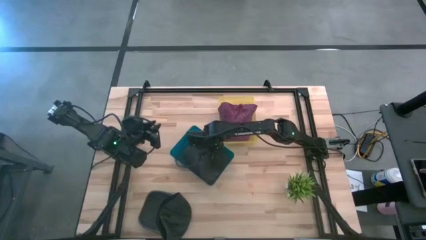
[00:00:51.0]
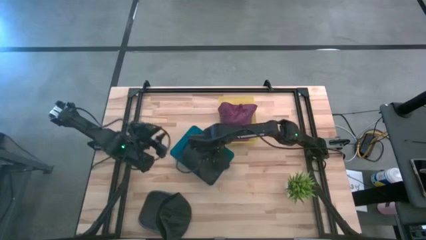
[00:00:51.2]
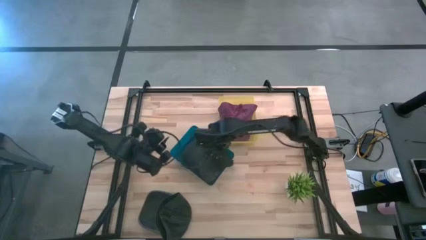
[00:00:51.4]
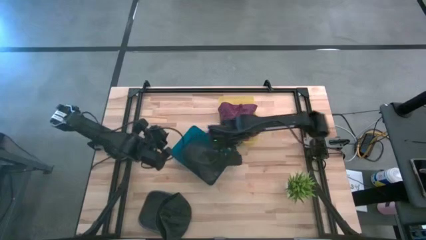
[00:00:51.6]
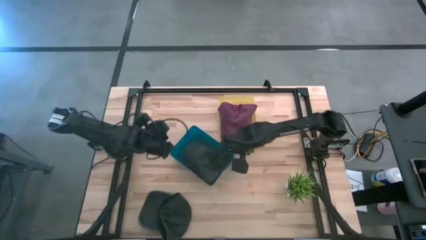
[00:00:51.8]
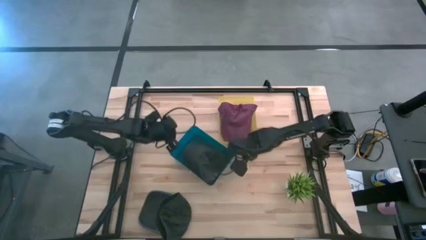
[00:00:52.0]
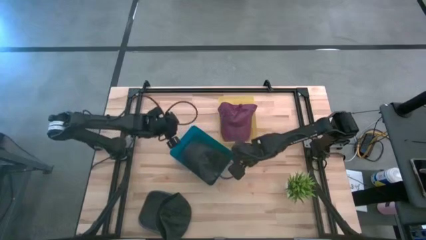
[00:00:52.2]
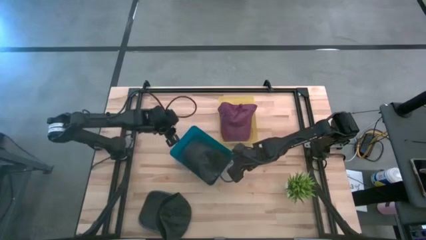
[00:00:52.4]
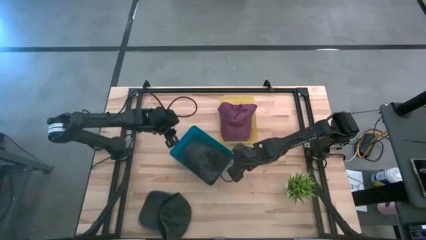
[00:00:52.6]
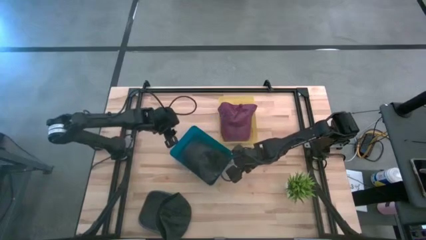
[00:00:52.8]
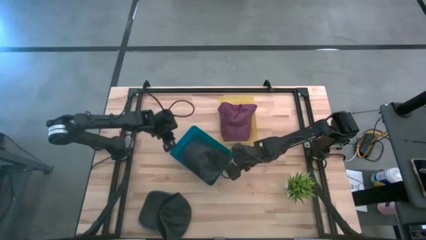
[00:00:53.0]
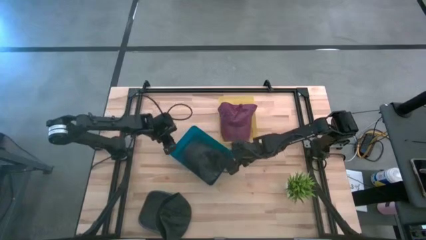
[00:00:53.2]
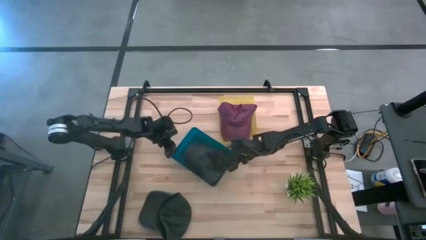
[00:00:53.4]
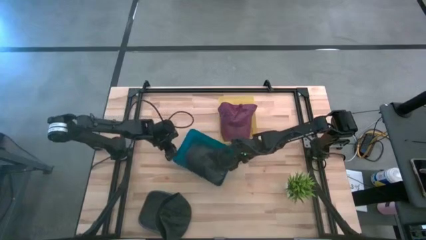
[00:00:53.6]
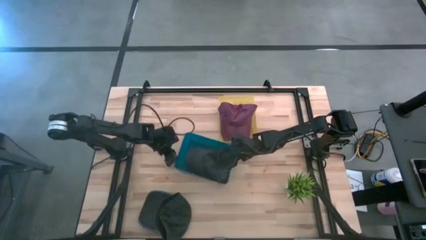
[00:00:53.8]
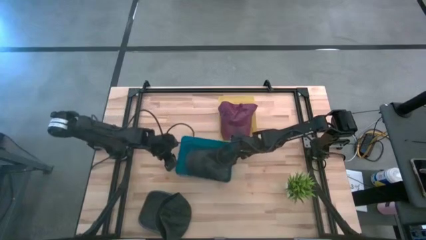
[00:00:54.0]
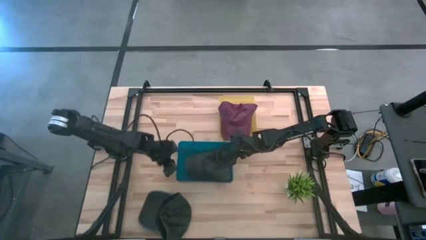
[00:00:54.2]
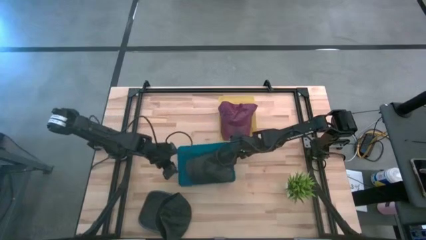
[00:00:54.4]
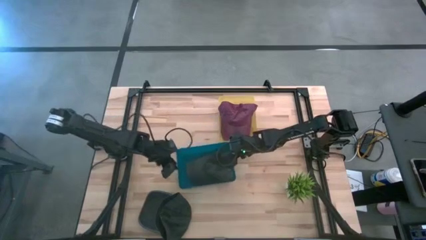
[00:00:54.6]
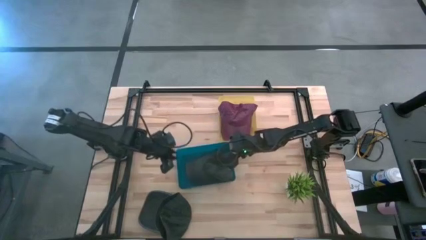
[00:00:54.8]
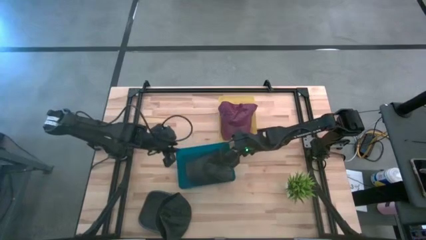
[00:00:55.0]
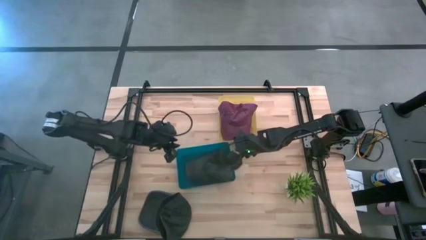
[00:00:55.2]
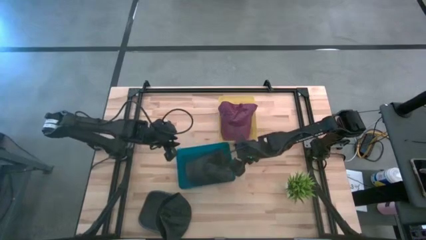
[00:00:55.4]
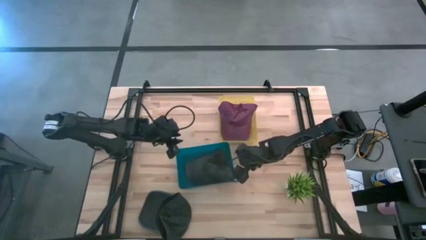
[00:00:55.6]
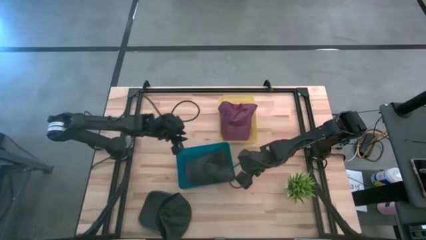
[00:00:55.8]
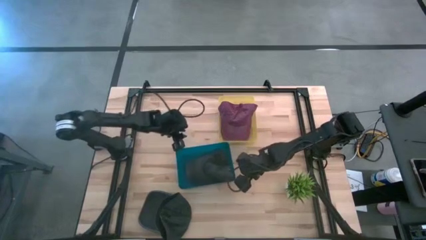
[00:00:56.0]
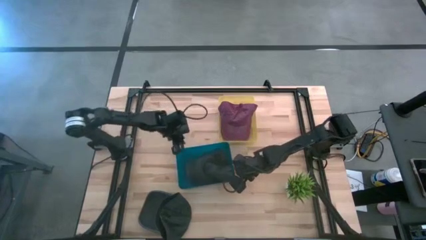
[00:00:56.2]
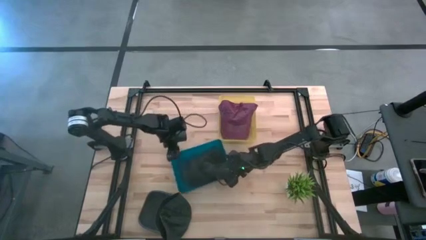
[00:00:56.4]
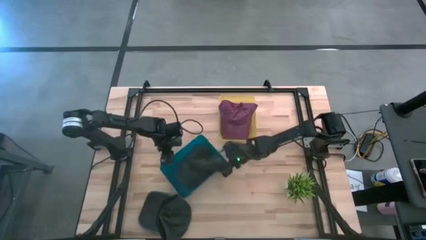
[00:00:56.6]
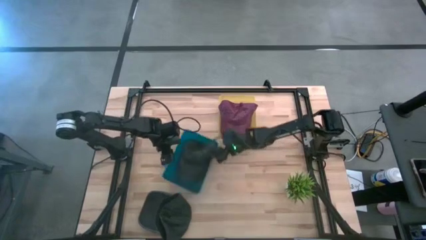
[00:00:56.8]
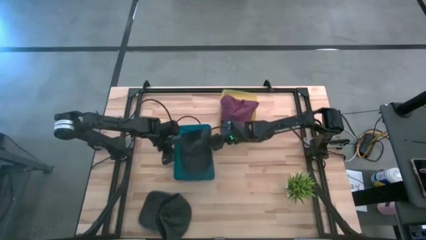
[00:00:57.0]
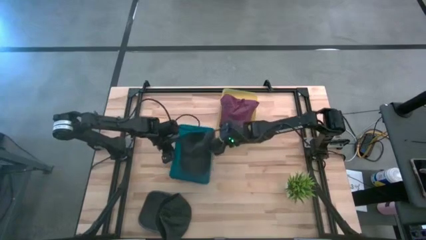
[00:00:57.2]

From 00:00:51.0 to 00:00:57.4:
Task: Pick & Place hat
Adjust the blue bin

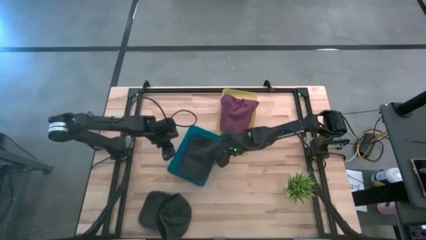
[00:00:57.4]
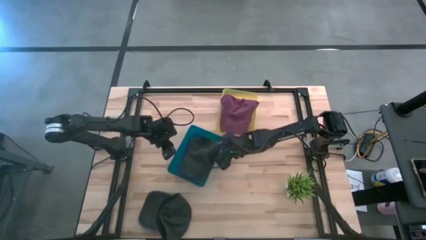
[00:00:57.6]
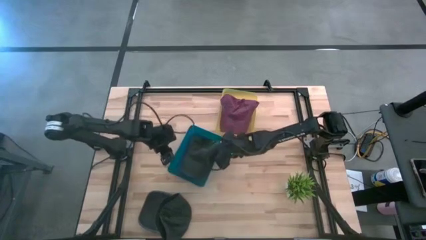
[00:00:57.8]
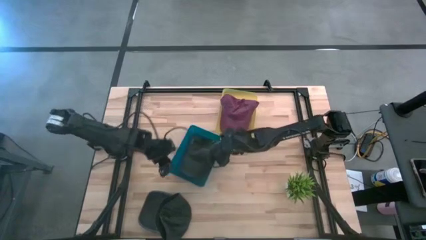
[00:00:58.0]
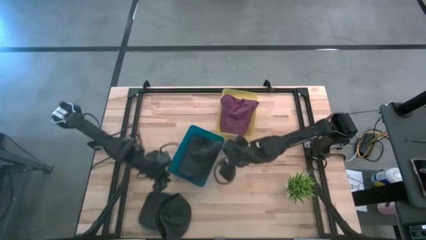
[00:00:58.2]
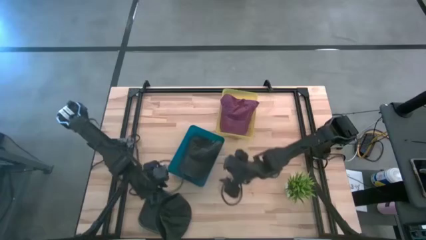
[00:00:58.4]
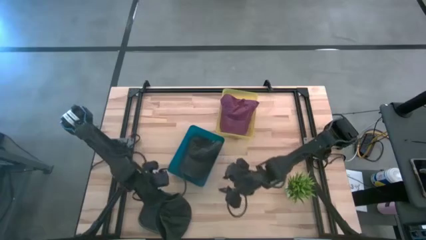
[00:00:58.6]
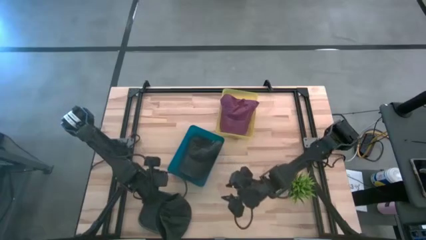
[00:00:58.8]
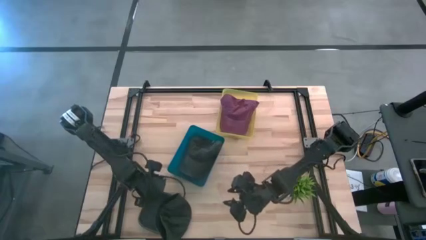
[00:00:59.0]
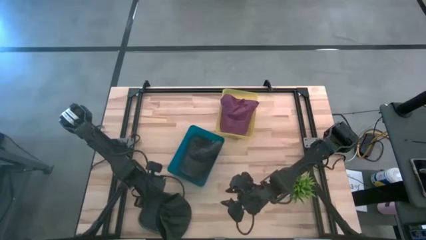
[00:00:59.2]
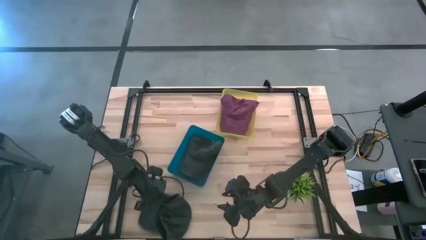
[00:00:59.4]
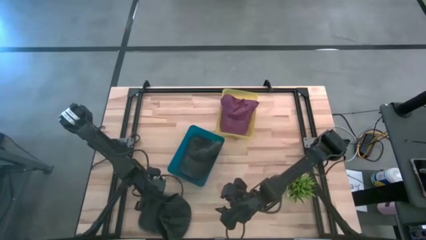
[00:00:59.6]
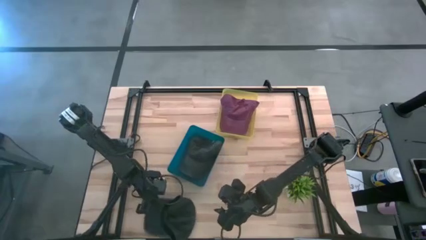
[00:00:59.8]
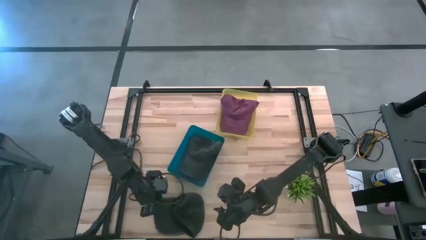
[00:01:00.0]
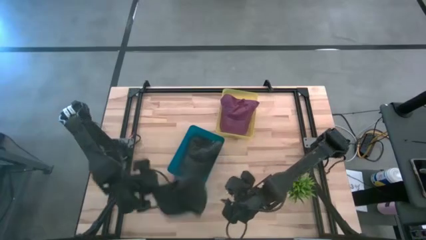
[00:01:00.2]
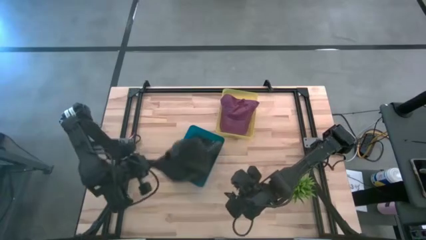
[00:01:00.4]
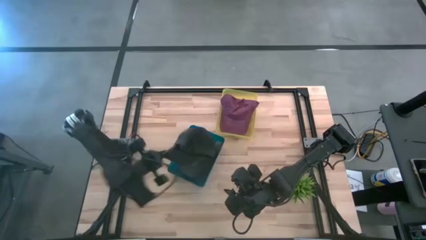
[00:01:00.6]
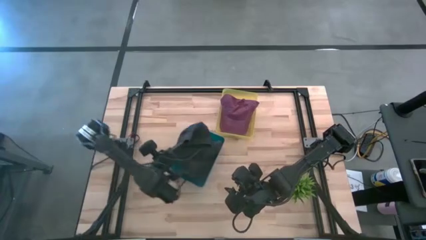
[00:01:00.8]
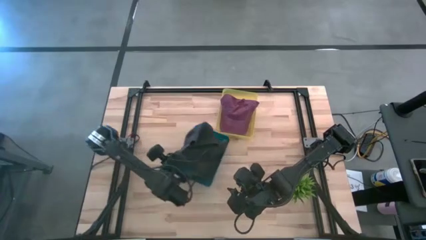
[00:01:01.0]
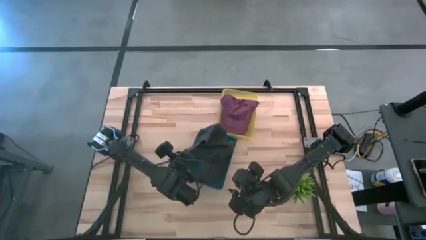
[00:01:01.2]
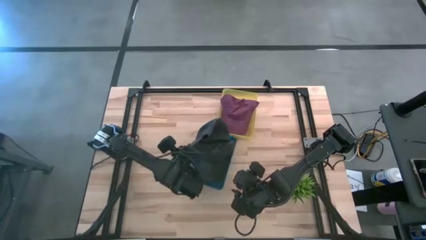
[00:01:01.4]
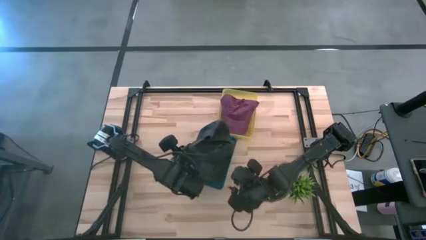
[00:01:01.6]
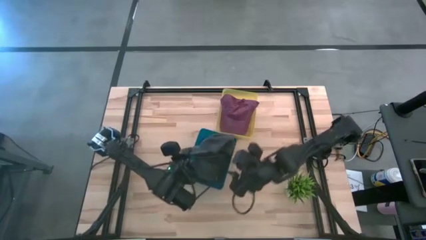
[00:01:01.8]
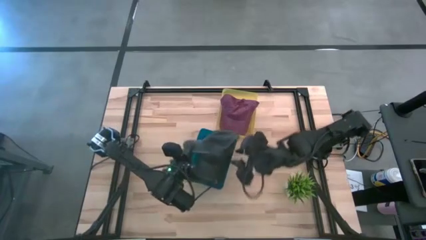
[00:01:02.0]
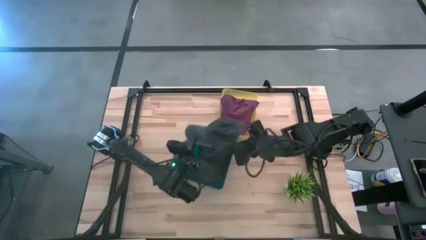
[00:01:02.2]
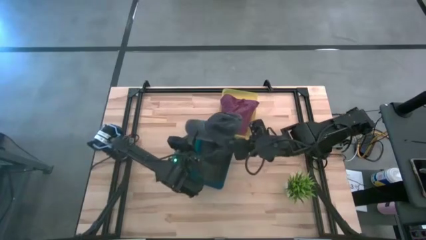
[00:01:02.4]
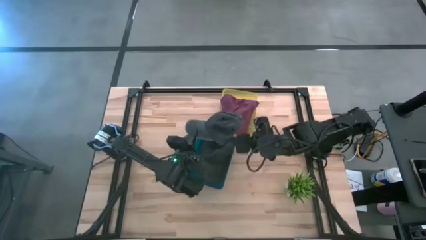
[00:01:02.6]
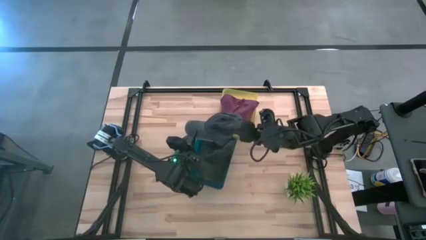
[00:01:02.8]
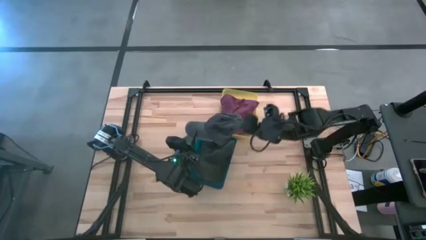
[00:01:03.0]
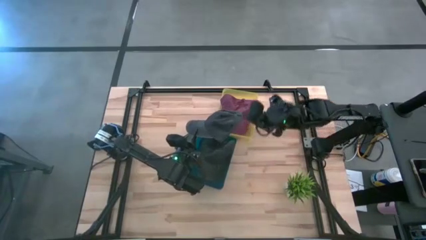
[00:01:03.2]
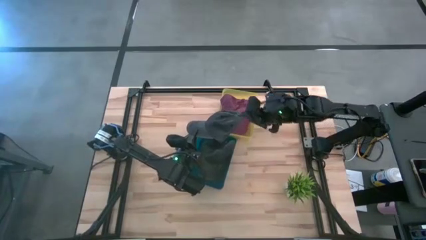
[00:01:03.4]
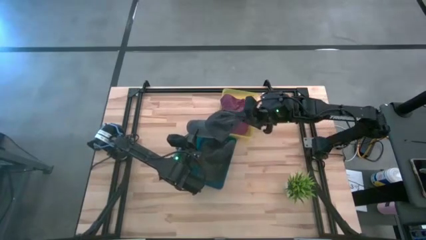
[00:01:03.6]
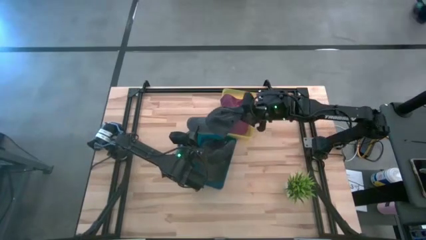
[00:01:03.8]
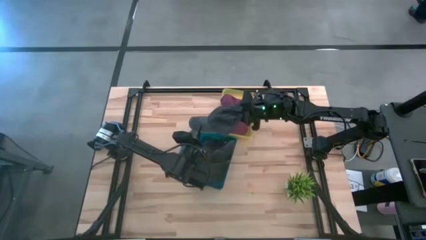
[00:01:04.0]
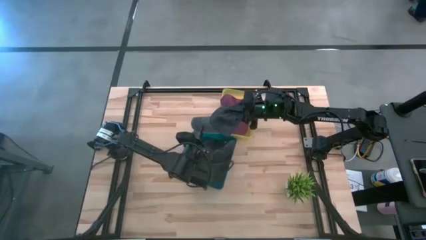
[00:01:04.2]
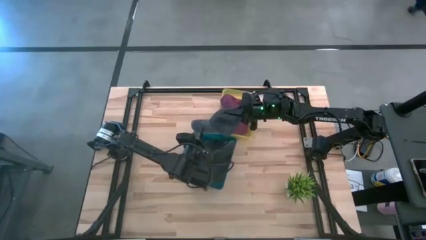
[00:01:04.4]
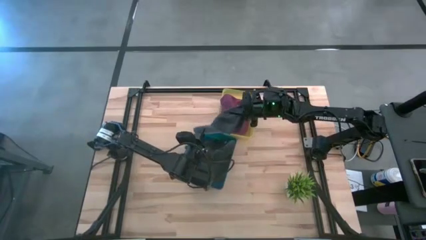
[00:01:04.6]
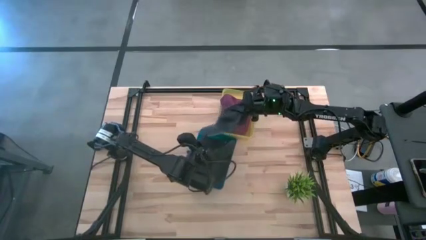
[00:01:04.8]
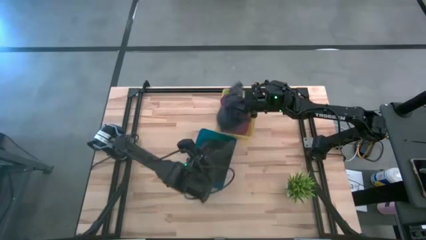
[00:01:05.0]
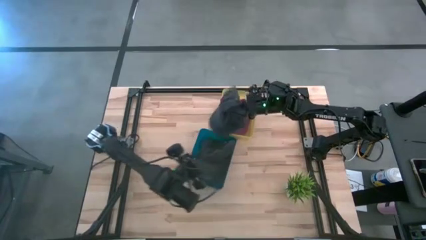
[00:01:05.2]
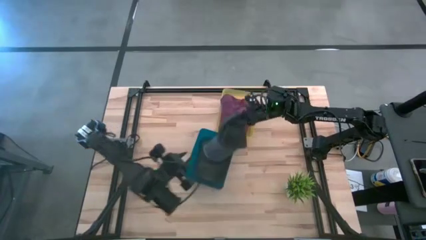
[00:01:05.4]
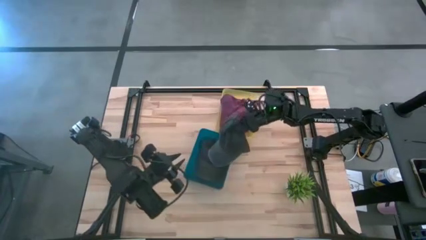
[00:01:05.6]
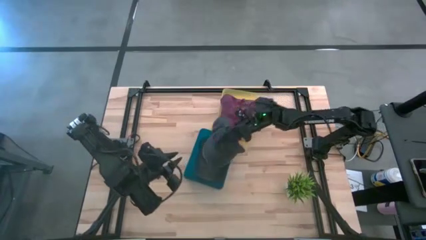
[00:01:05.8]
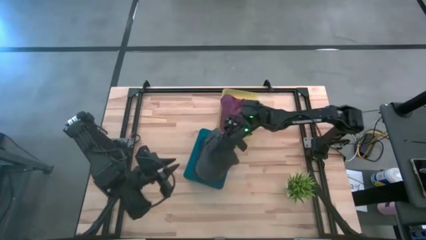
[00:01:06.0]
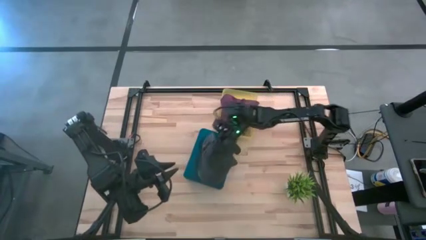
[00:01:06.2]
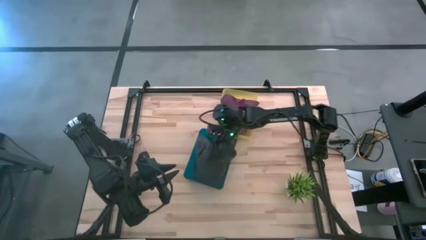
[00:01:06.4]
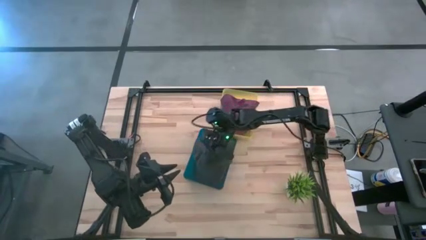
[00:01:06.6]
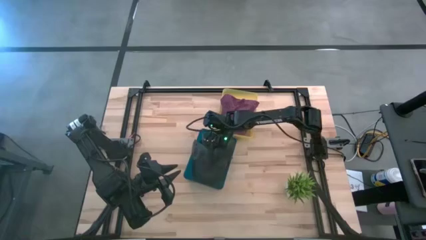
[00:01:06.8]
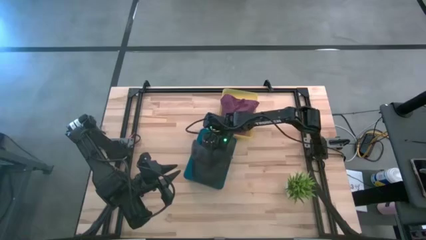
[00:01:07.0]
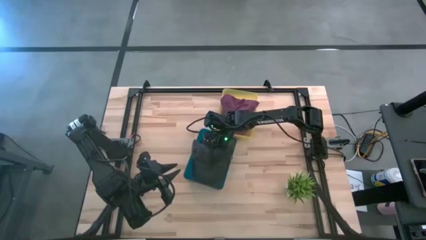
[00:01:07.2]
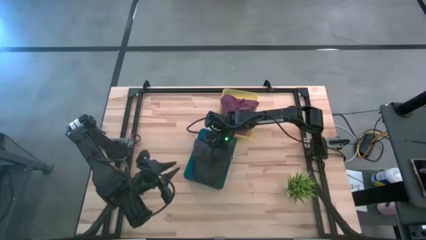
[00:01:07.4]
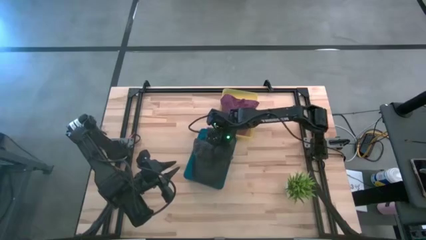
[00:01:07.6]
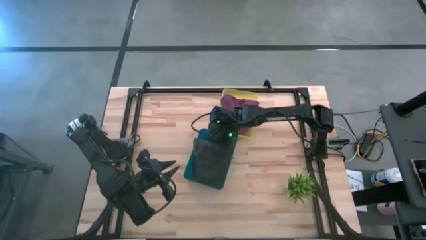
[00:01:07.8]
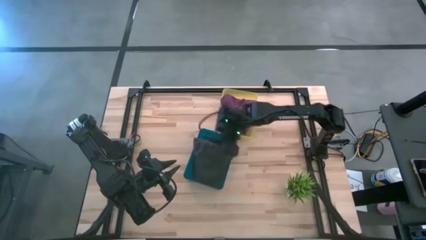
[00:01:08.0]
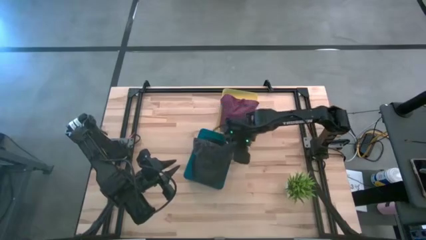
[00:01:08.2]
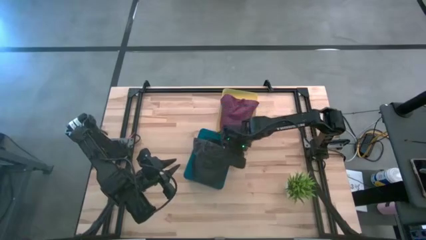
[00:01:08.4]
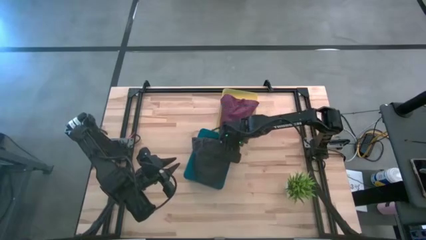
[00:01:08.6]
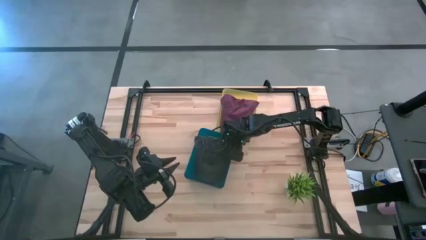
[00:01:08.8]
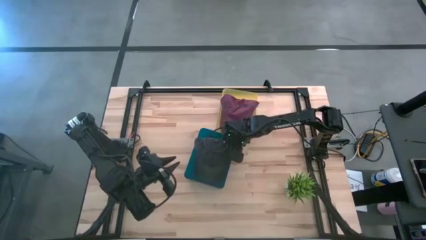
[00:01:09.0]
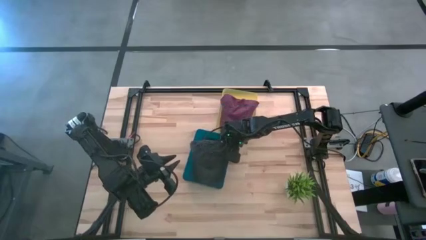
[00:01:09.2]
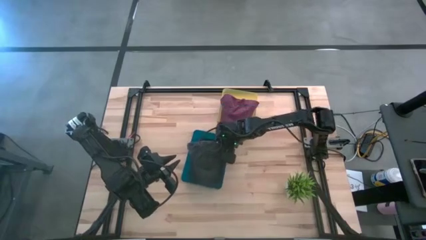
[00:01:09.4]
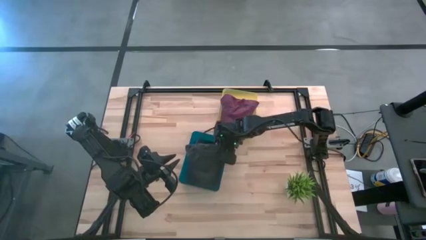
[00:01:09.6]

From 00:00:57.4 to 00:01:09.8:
Put the black cap into the blue bin
